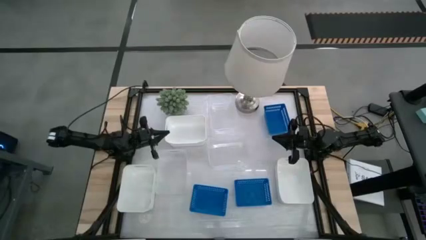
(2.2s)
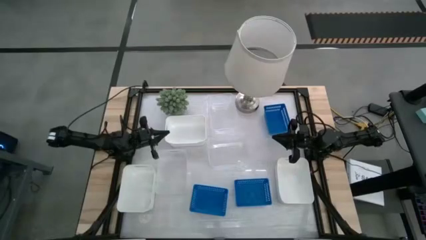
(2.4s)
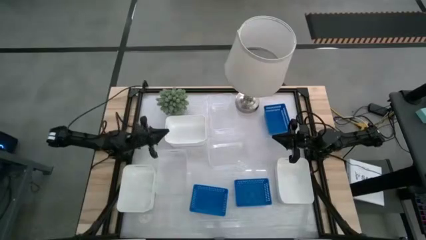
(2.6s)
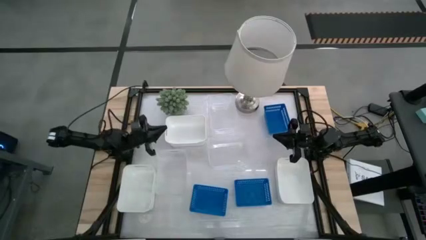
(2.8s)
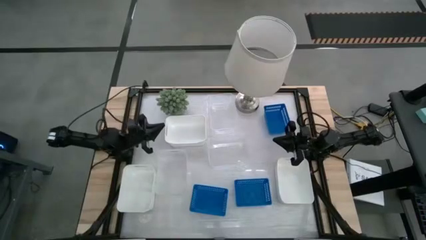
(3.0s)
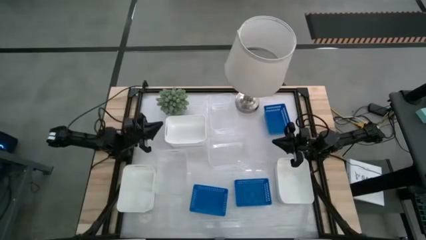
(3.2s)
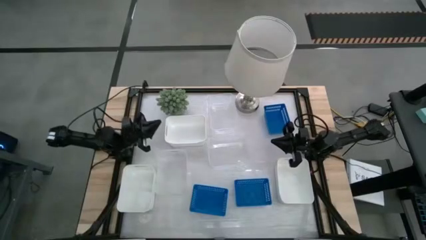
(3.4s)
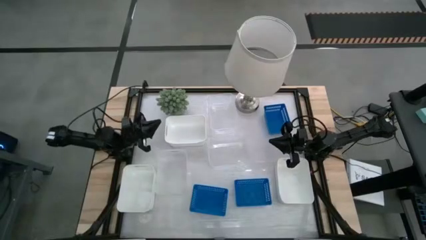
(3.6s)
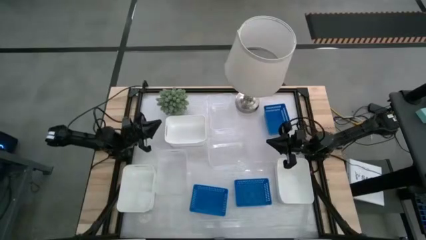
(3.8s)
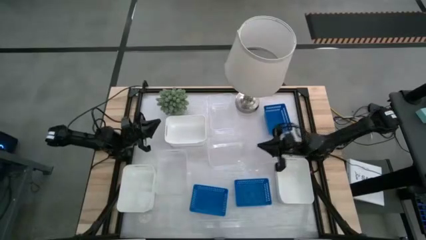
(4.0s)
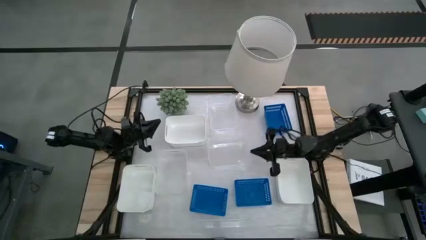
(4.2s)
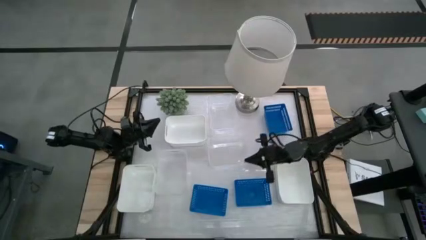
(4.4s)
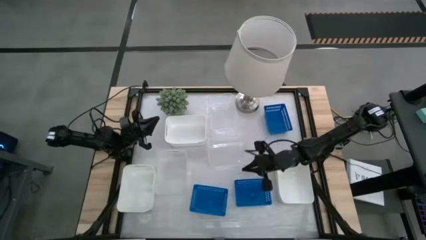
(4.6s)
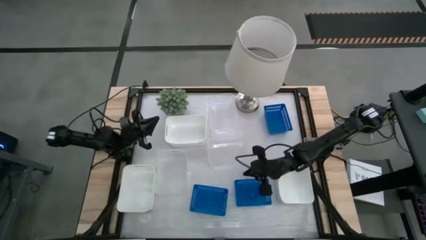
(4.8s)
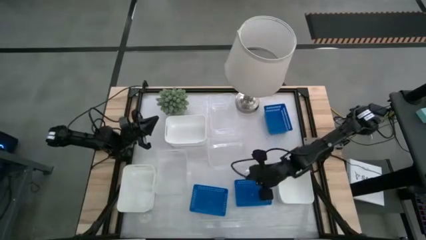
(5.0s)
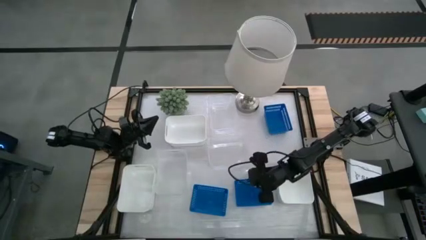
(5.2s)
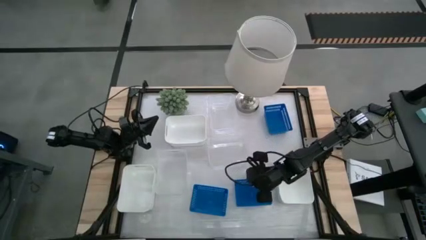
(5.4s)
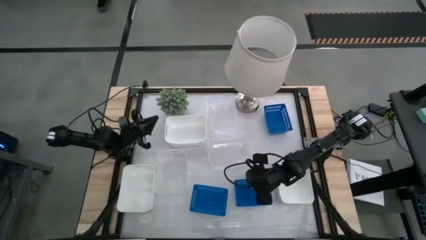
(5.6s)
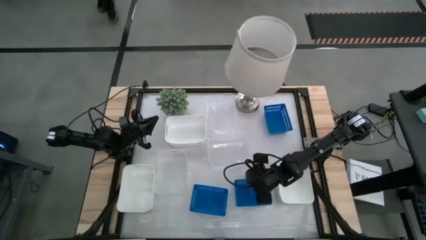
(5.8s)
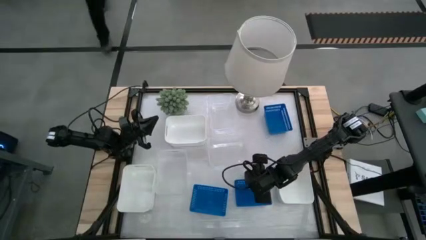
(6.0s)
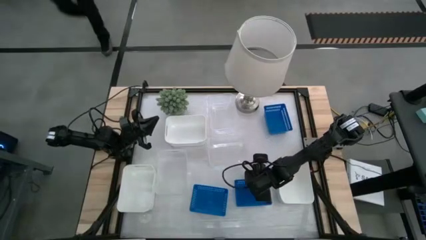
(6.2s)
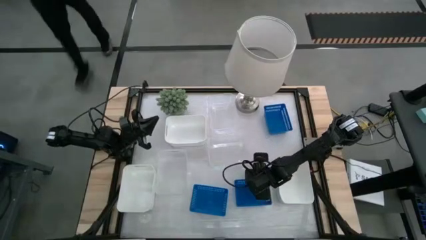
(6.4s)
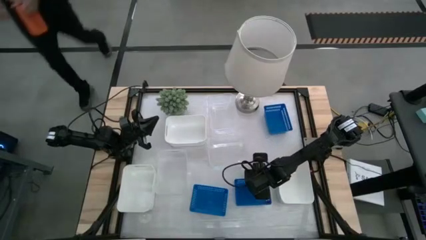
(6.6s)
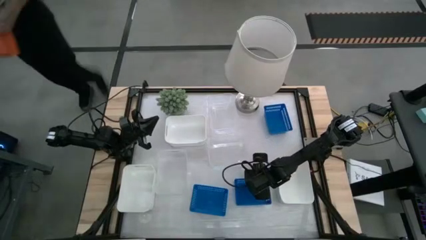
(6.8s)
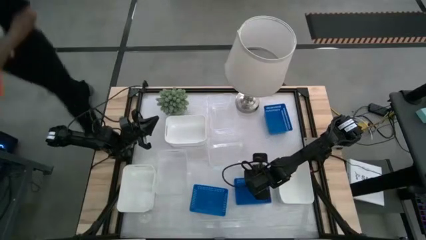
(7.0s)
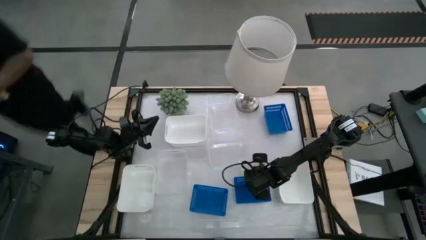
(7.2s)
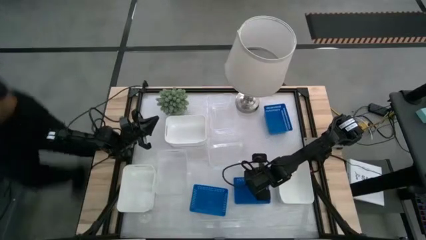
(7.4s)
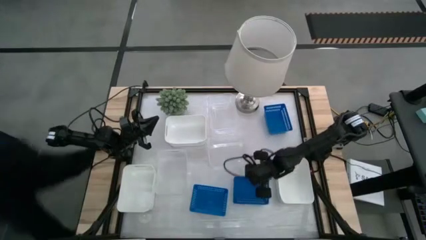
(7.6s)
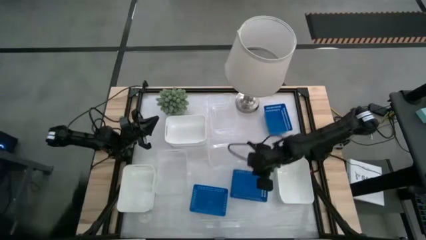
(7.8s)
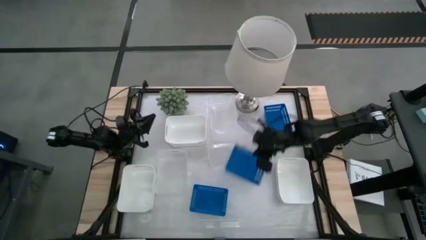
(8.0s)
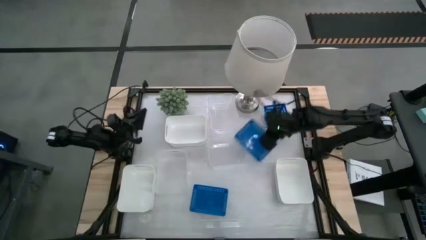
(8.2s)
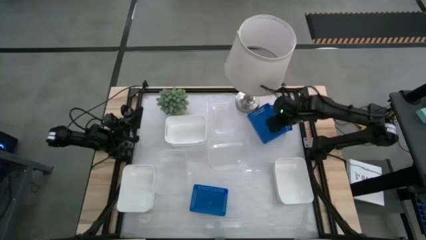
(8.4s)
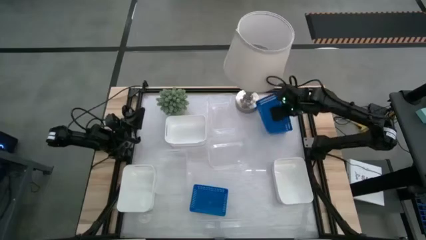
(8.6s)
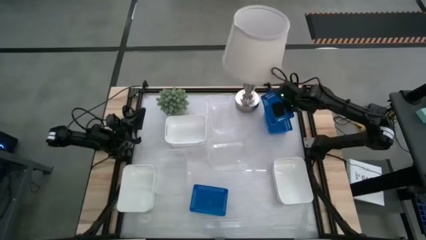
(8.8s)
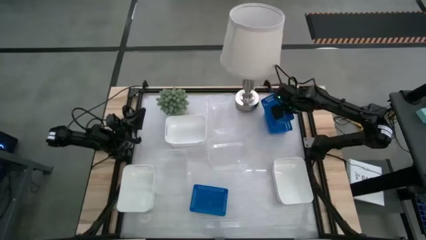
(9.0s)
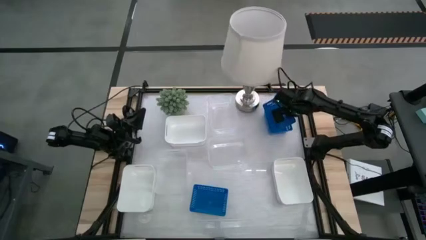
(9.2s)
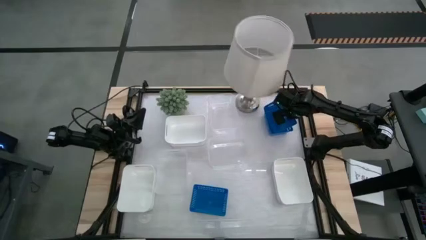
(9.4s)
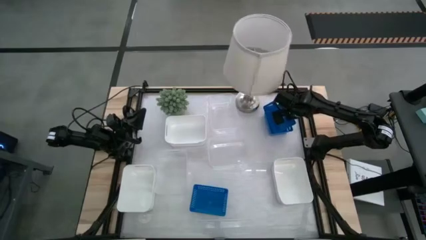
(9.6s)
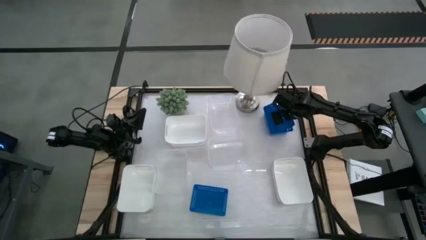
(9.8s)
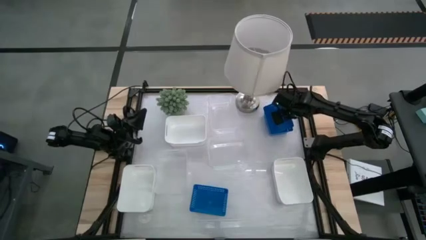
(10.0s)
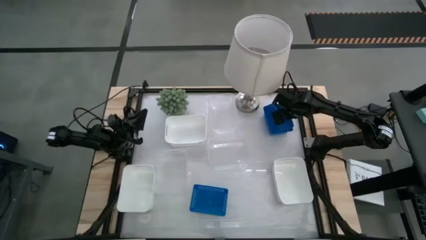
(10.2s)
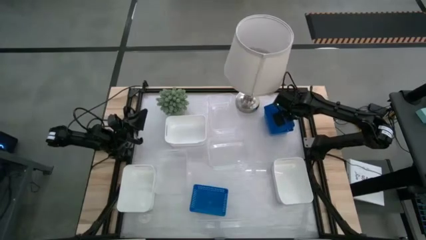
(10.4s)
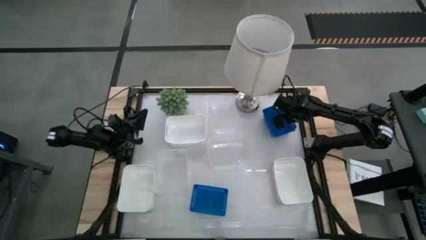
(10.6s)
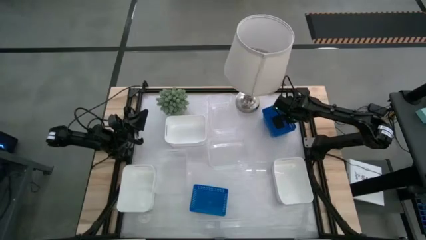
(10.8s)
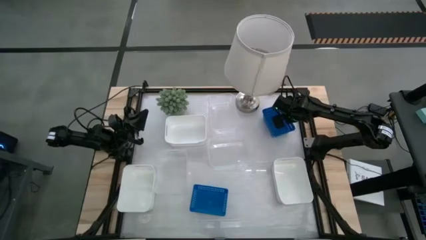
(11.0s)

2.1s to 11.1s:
Stack the bottom center blue bin on top of the top blue bin

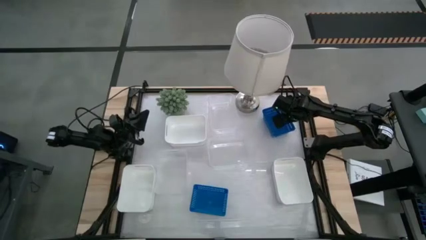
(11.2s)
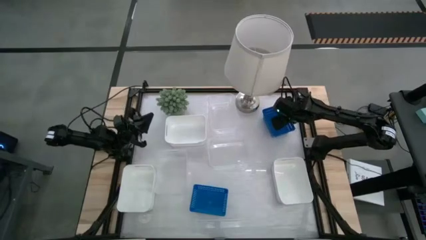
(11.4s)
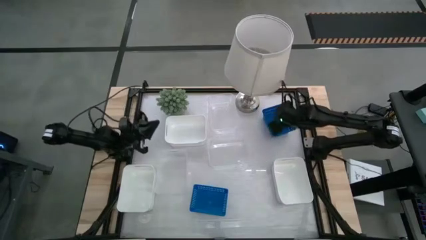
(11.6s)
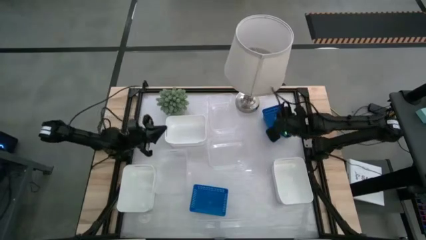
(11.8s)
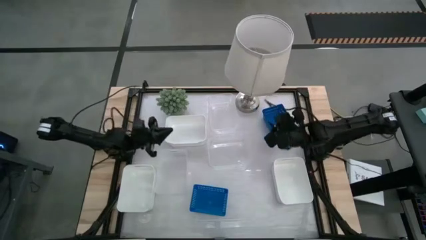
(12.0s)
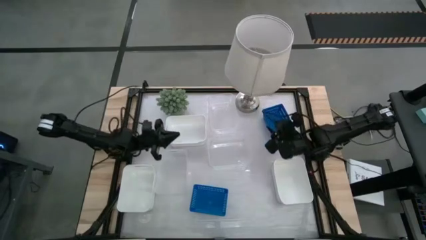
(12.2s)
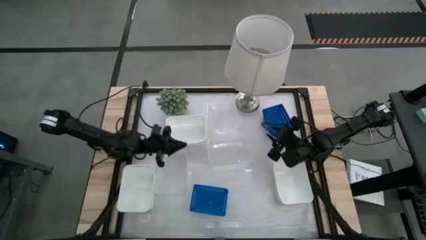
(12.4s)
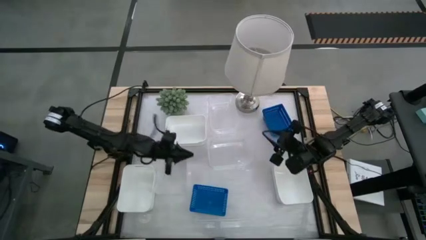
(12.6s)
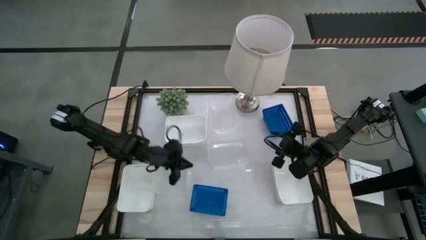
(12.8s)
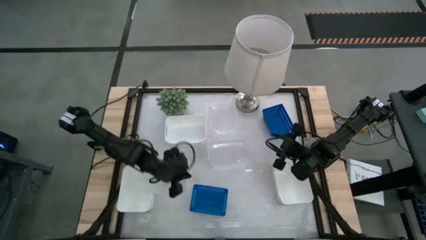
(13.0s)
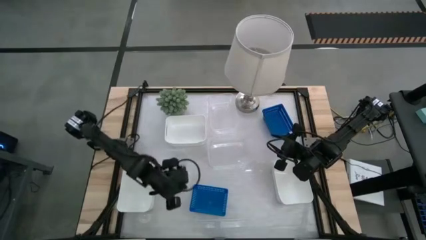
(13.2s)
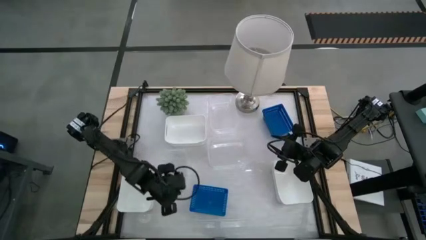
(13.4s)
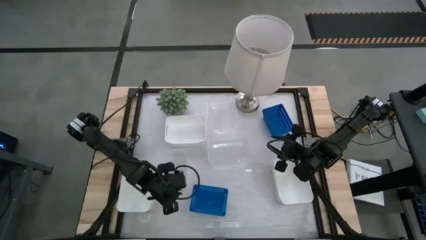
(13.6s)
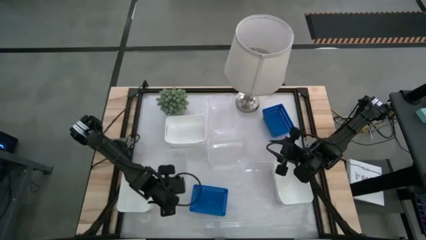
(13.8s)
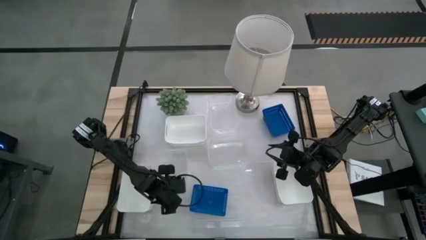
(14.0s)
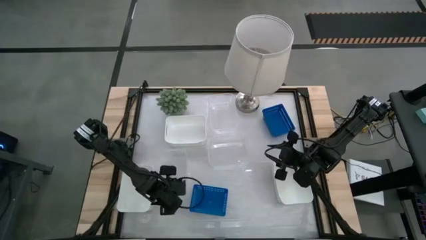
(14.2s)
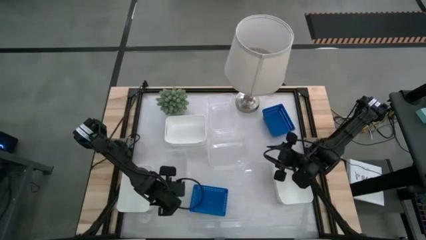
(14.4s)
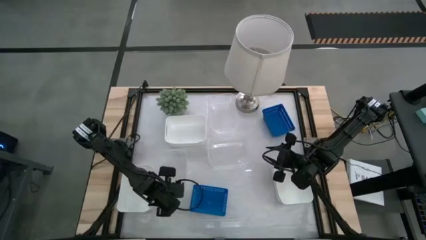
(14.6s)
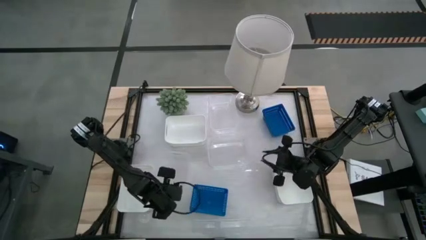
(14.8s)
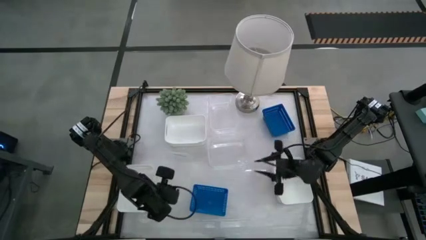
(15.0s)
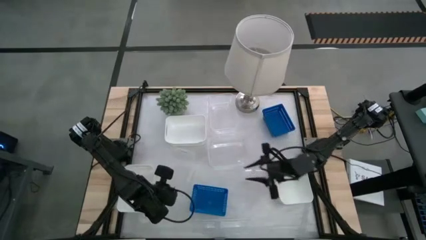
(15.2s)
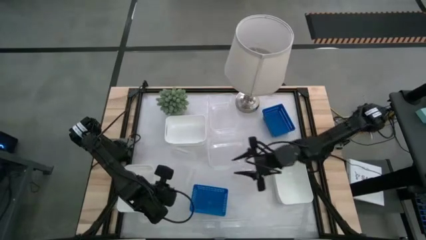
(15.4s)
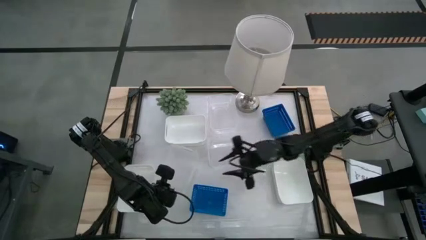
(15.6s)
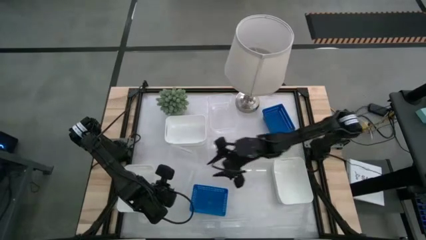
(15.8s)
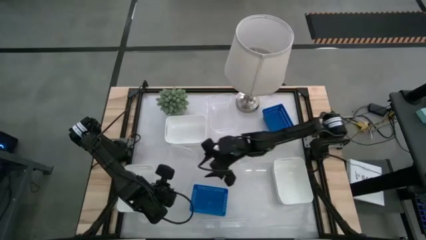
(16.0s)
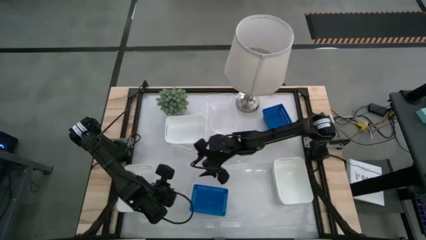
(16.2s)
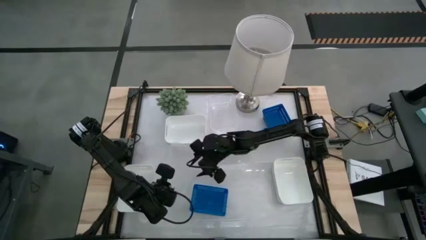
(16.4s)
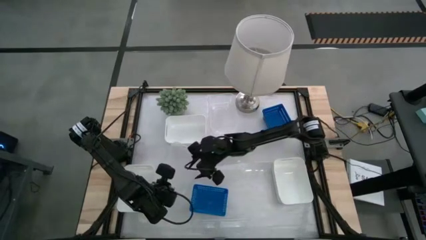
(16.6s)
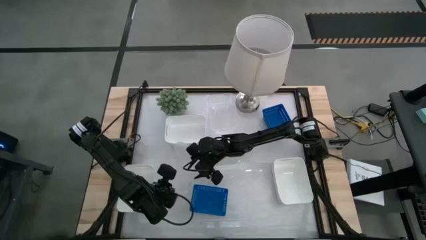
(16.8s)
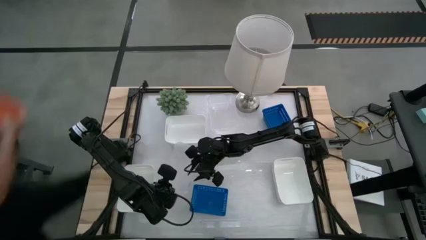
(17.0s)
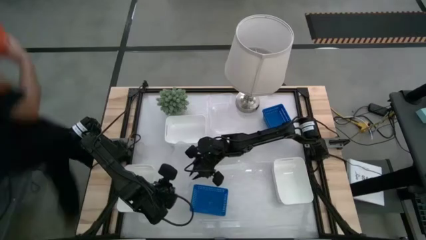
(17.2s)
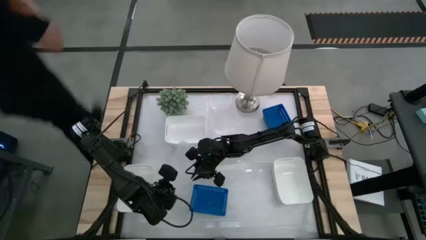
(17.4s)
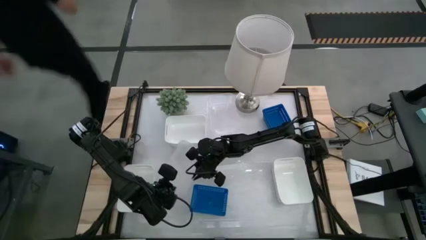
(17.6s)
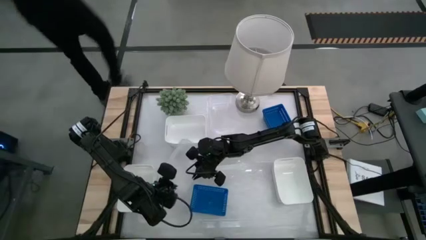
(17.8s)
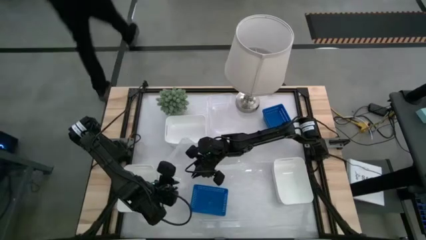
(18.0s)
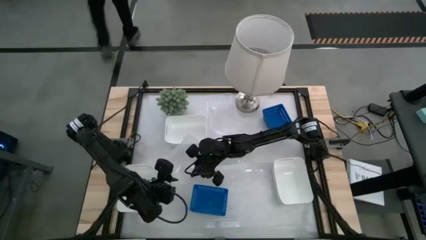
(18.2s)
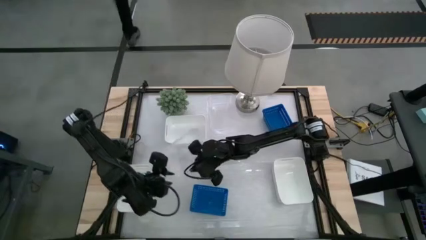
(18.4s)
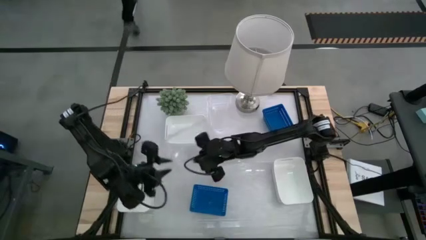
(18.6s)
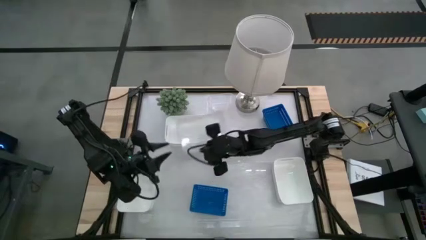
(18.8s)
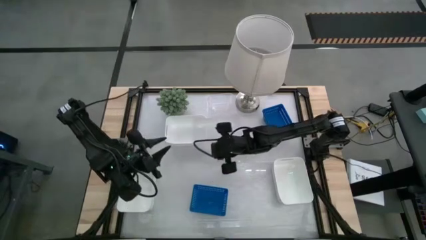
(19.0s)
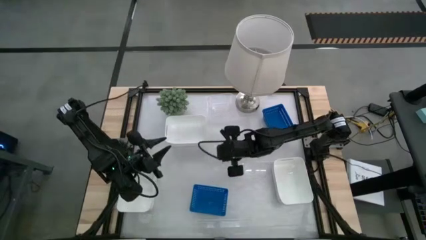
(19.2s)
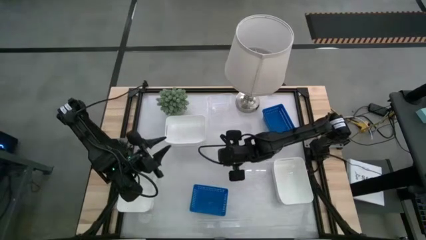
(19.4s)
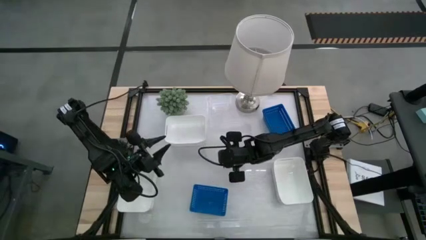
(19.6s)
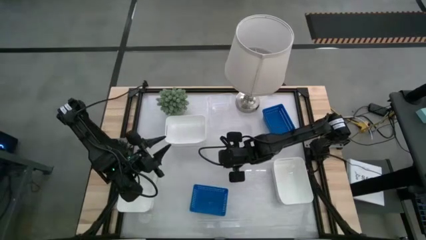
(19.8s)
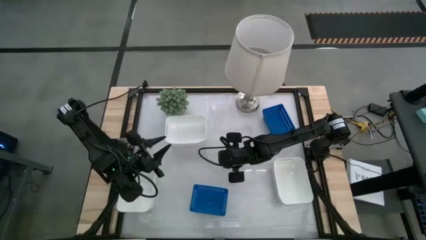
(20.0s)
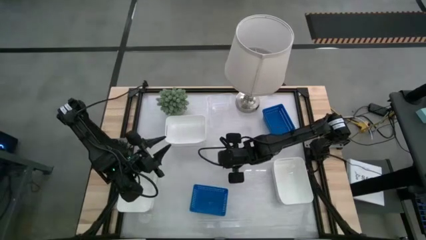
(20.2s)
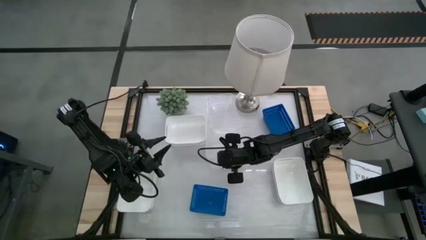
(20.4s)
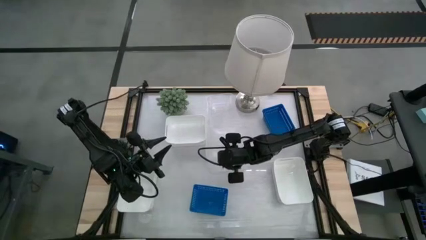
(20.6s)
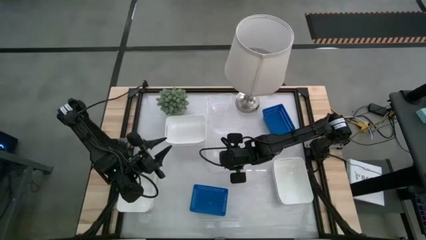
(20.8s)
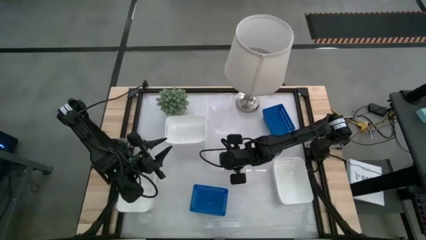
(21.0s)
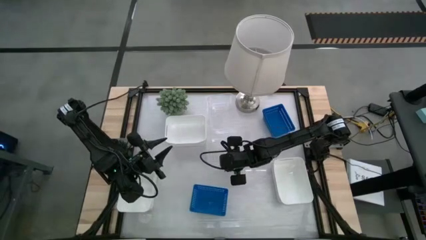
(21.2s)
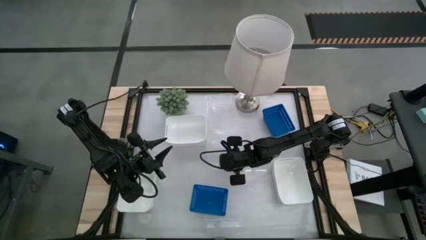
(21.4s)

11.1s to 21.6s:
Stack the bottom left transparent bin on top of the center transparent bin
